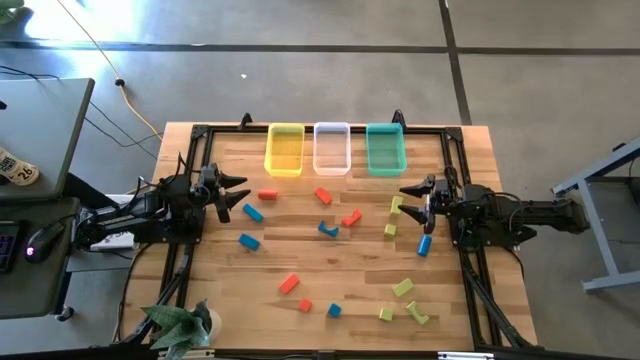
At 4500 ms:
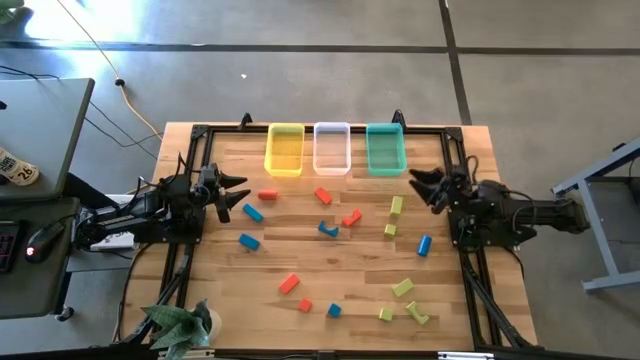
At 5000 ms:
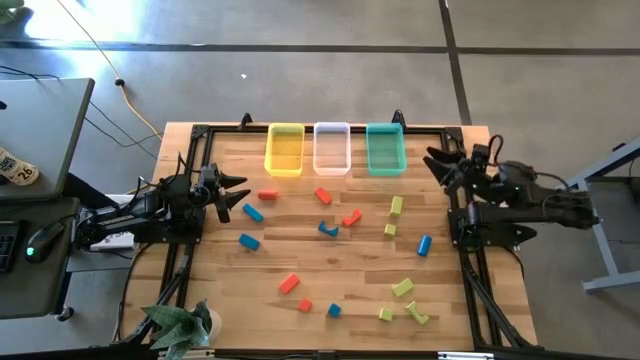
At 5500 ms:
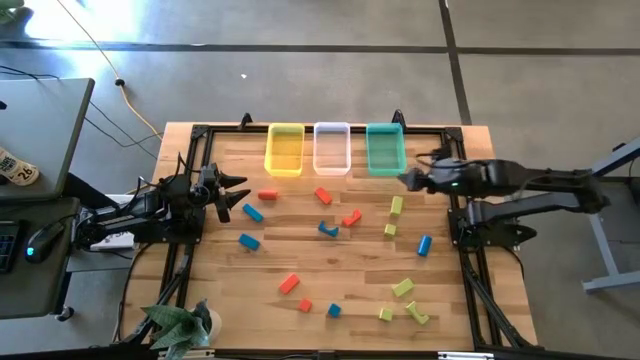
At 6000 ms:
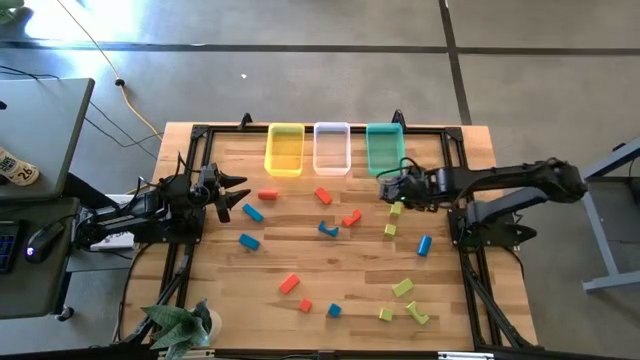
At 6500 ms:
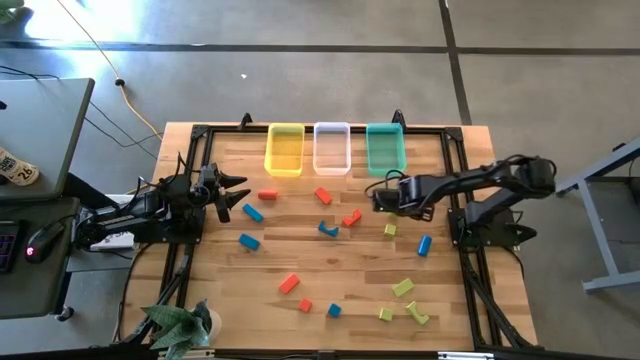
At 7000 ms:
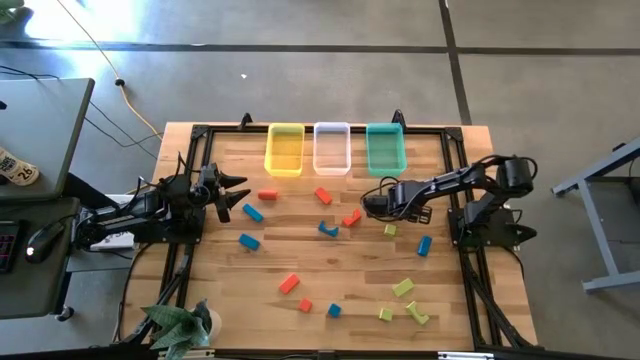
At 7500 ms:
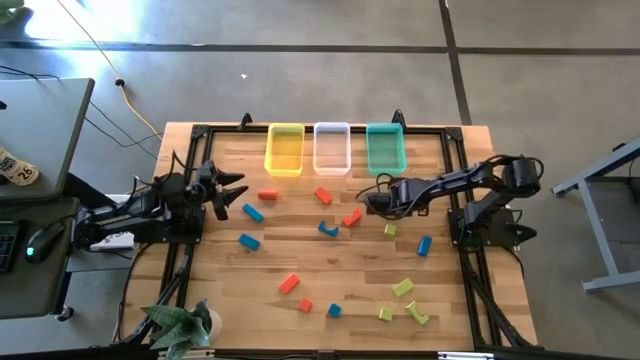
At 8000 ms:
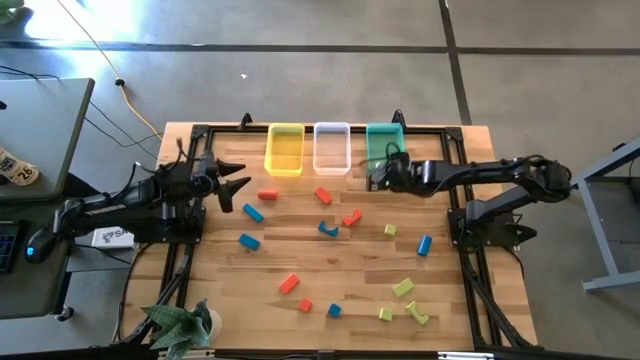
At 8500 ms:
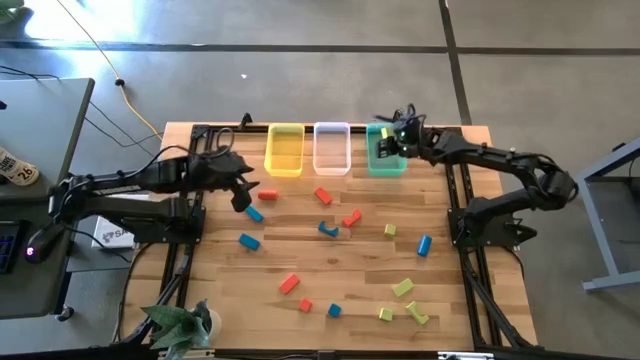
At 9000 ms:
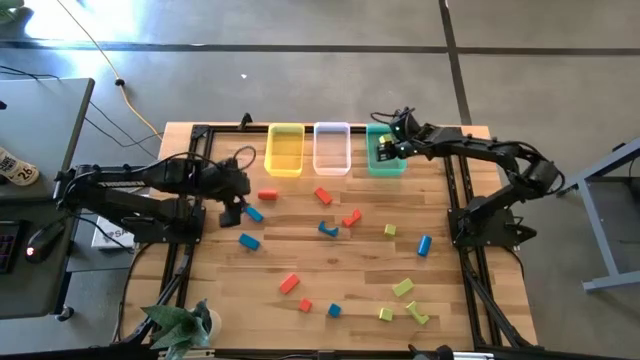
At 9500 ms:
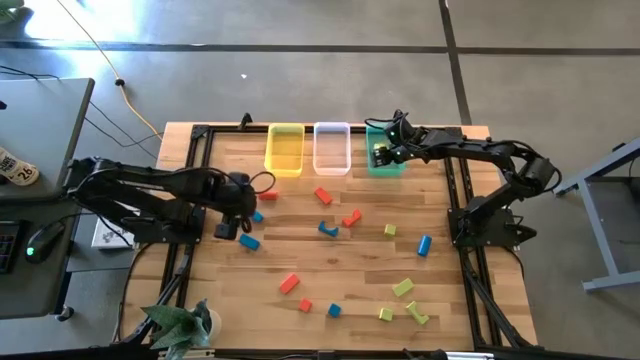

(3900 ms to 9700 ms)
Task: Sort & place blocks by color
Put the green block into the green bin

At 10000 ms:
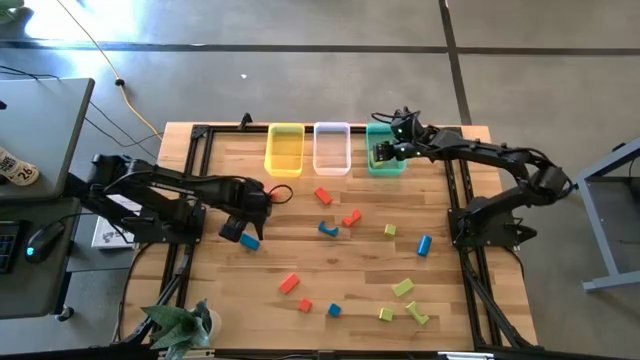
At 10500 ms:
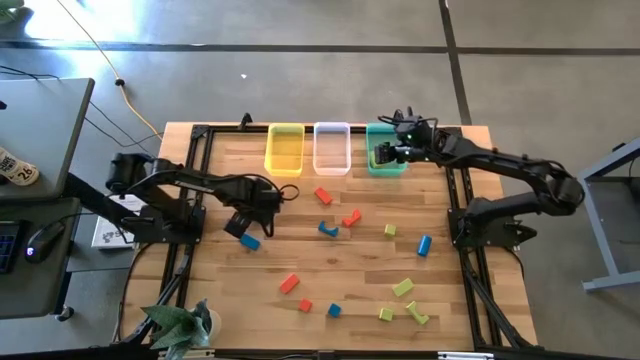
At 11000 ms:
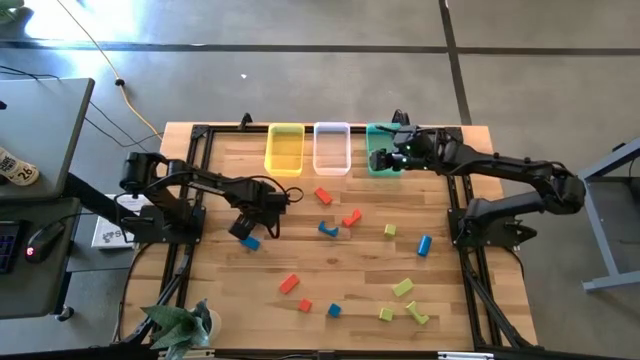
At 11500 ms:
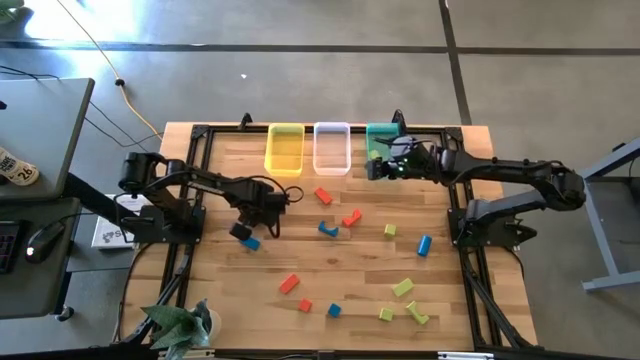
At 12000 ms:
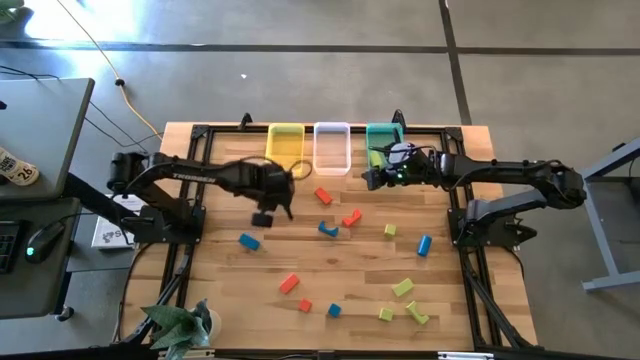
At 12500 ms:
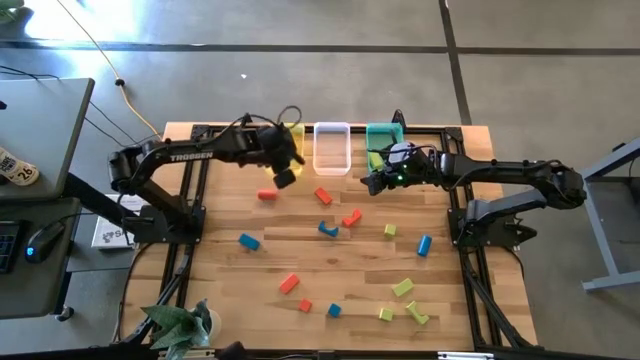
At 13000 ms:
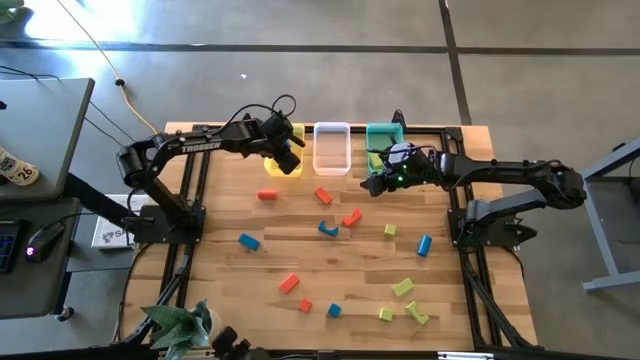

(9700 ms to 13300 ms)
Put the blue block into the yellow bin

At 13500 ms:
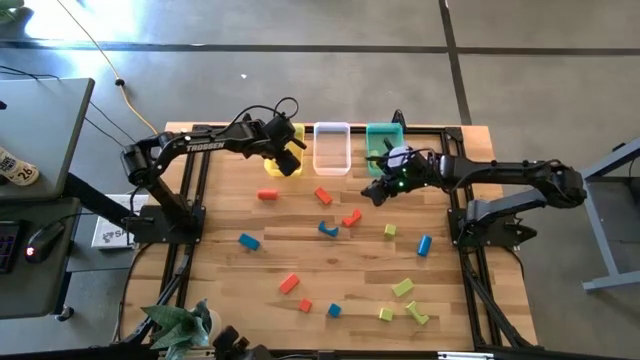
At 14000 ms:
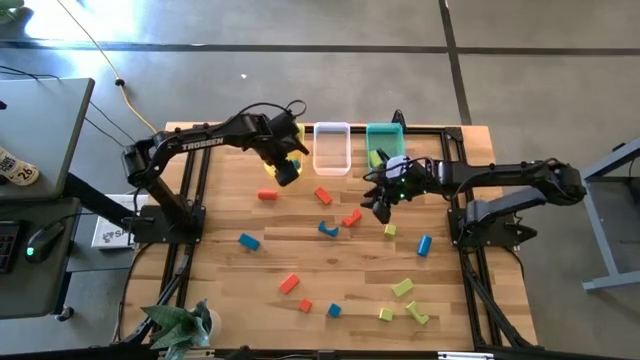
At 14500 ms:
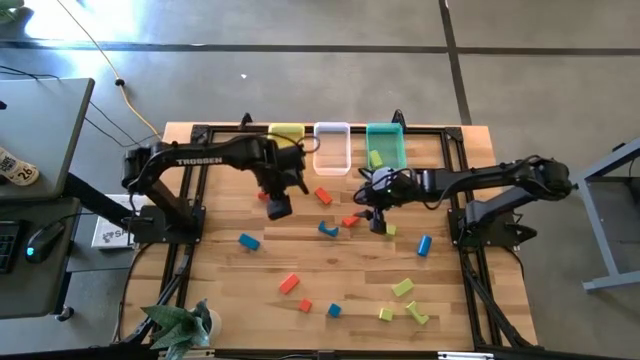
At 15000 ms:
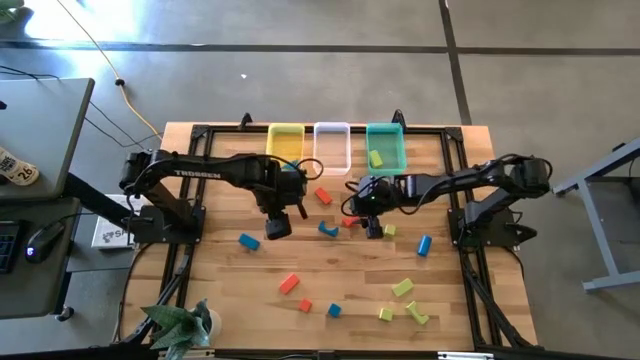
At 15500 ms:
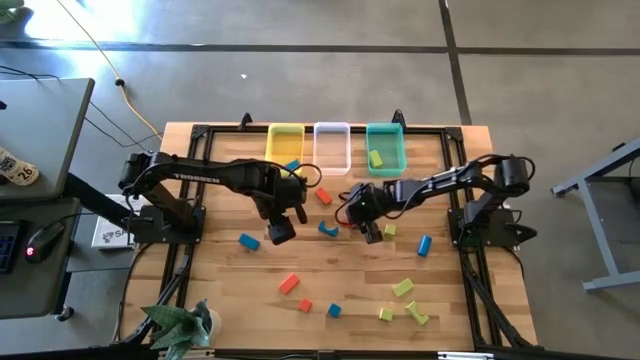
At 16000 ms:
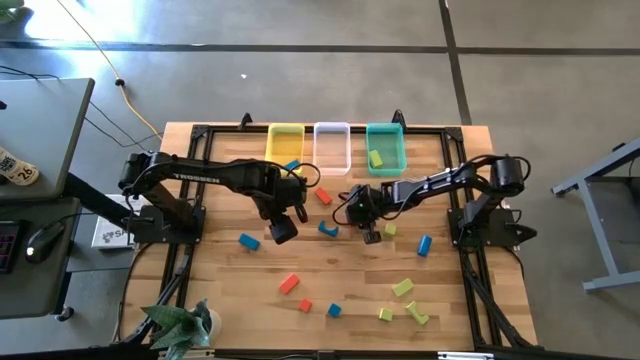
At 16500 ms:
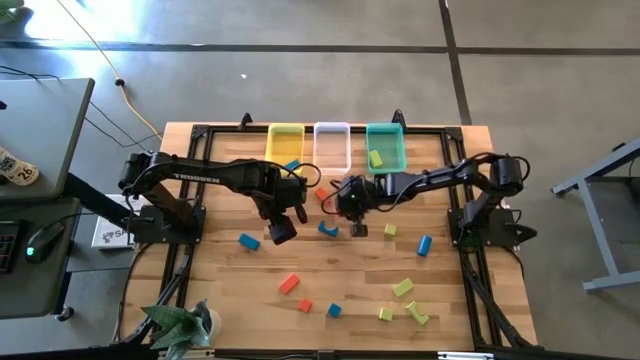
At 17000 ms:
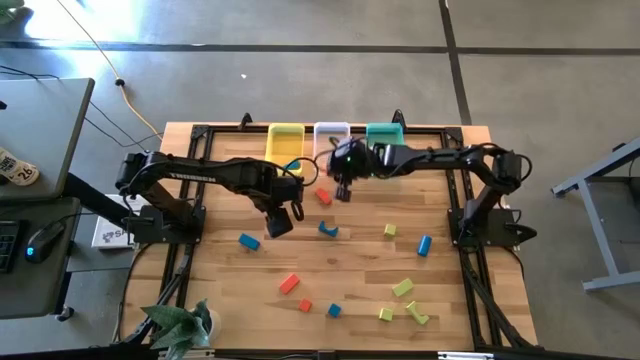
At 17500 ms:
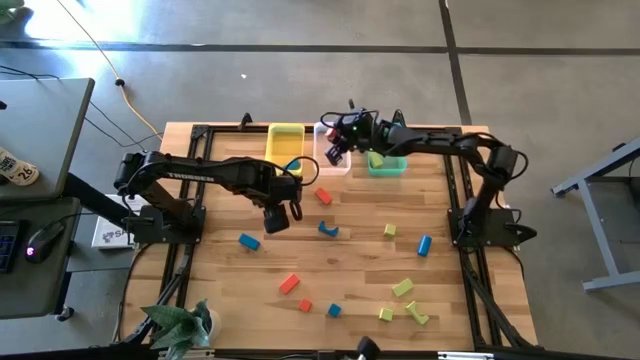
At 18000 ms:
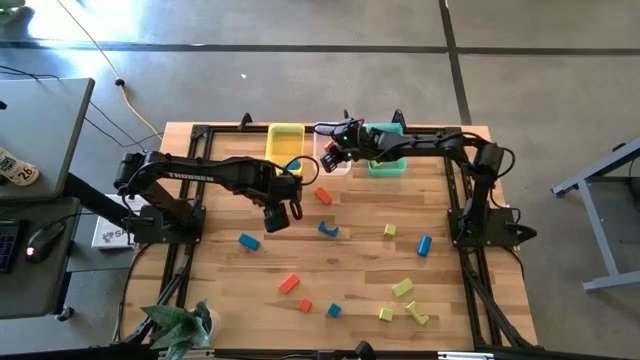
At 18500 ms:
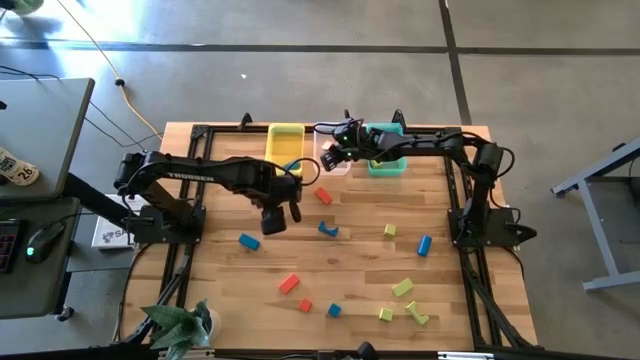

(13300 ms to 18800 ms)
Put the orange block into the transparent bin

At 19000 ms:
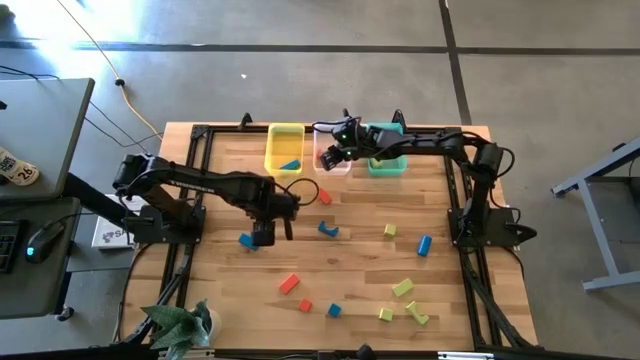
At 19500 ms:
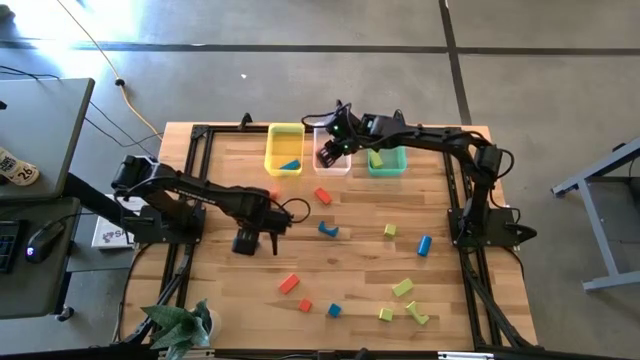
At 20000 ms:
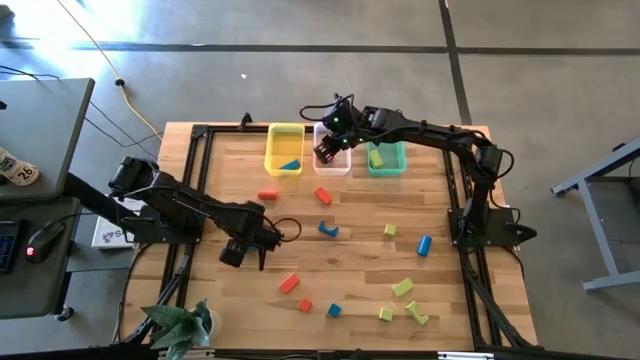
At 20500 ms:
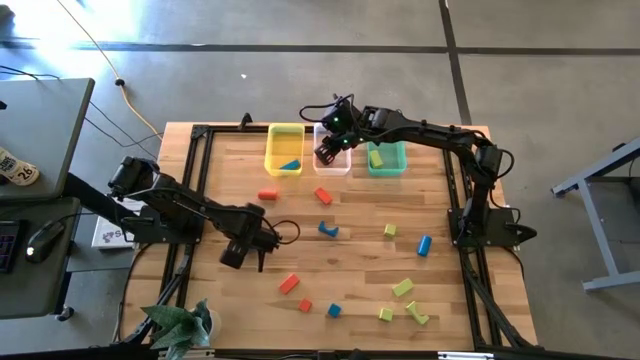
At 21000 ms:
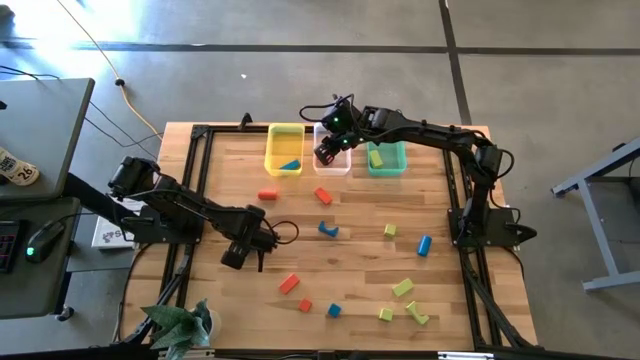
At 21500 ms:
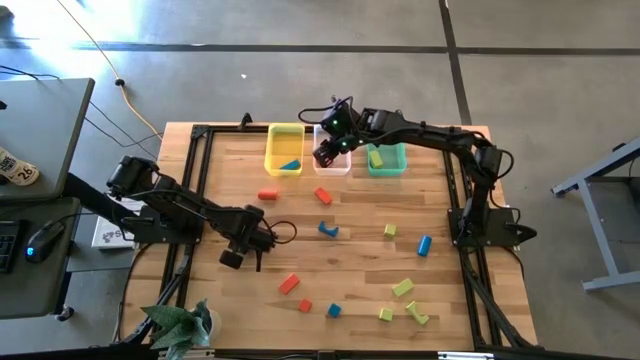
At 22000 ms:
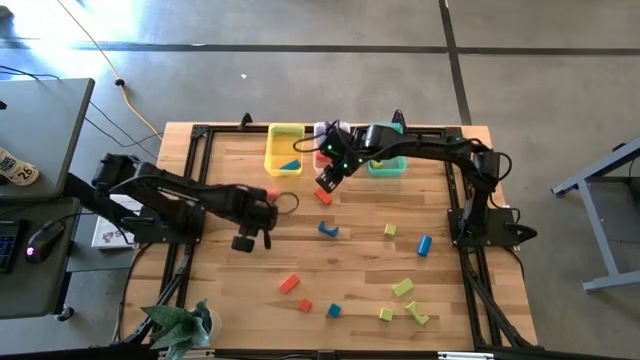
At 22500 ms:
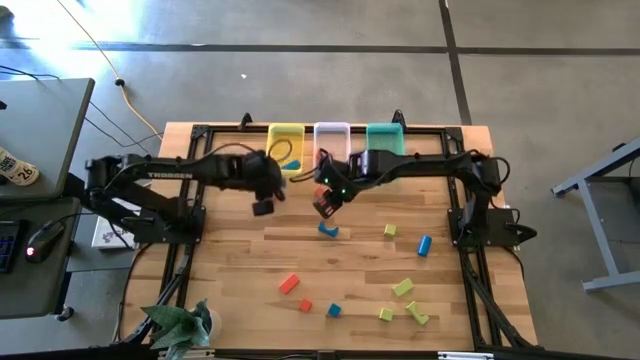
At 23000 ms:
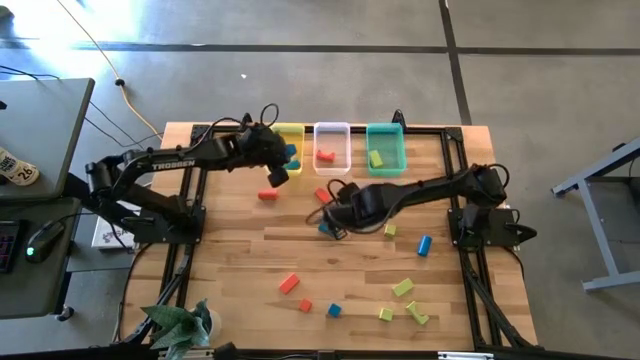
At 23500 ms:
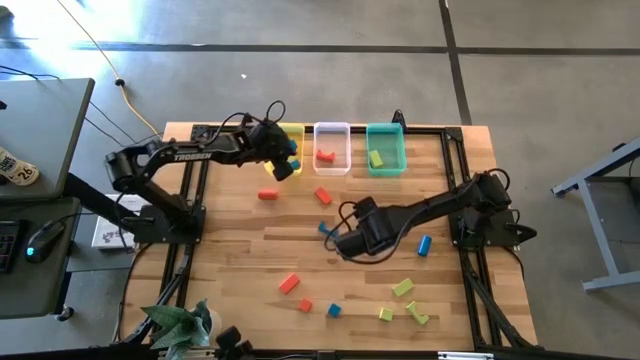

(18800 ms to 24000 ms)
Put the blue block into the yellow bin
